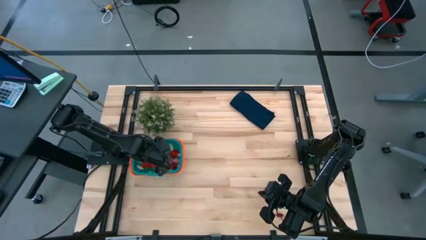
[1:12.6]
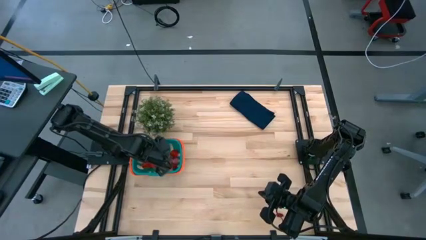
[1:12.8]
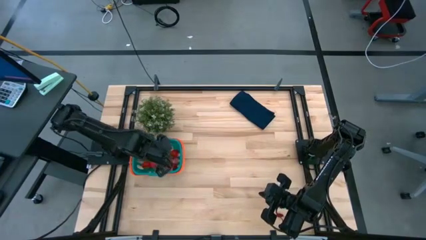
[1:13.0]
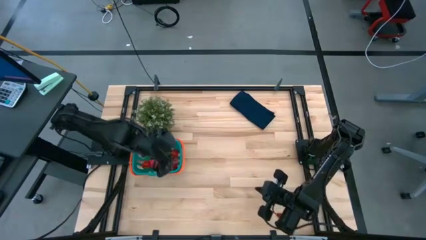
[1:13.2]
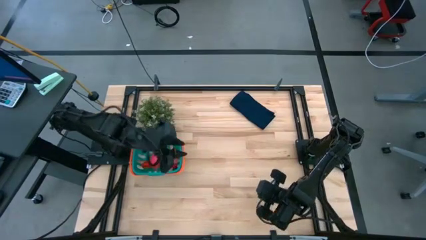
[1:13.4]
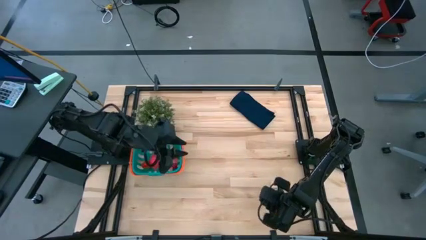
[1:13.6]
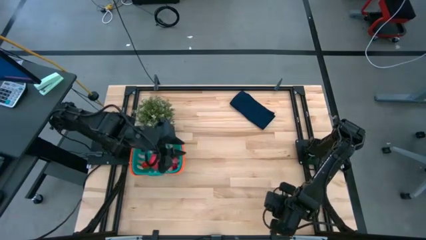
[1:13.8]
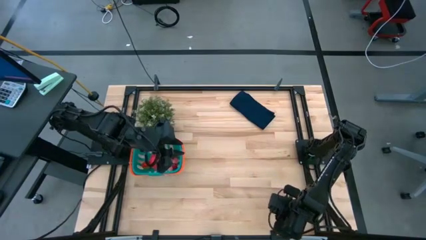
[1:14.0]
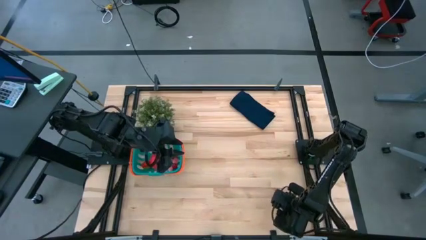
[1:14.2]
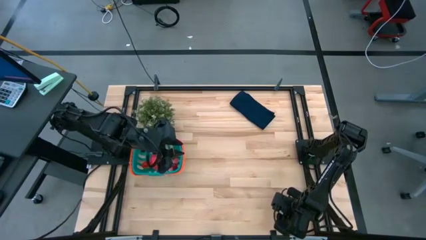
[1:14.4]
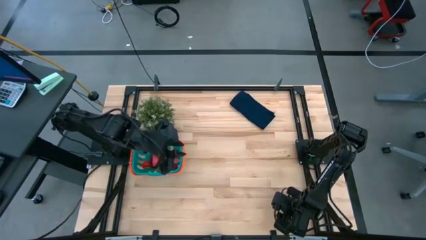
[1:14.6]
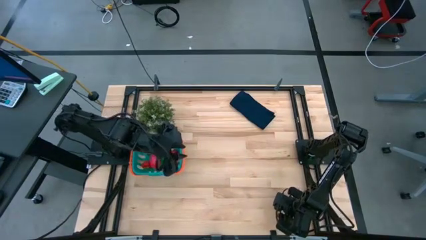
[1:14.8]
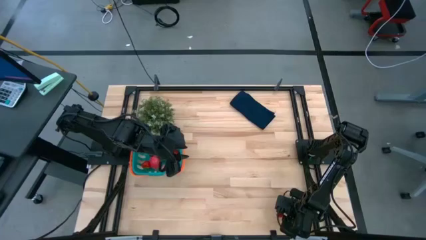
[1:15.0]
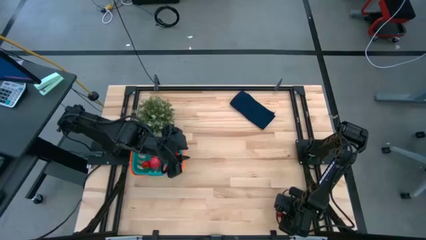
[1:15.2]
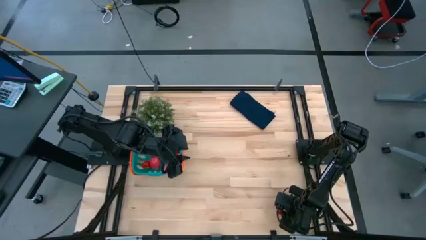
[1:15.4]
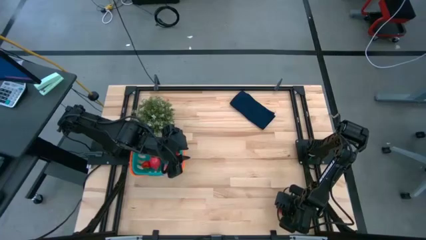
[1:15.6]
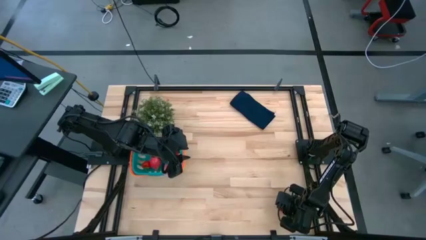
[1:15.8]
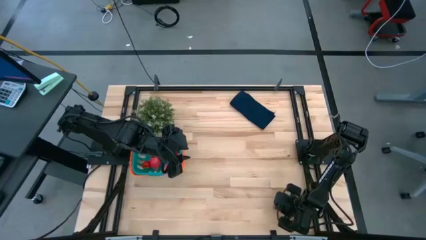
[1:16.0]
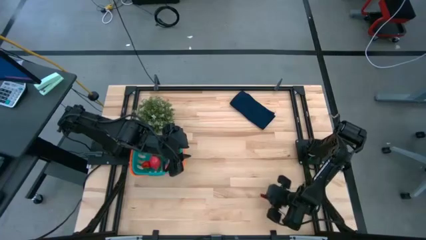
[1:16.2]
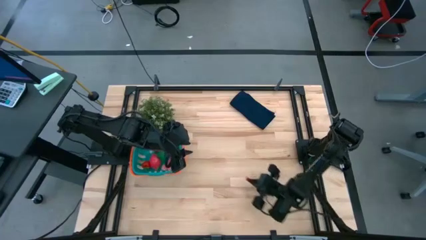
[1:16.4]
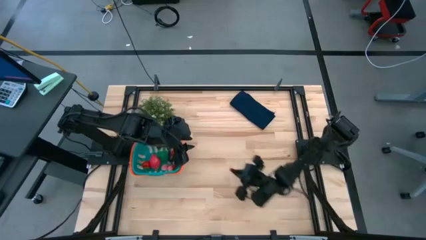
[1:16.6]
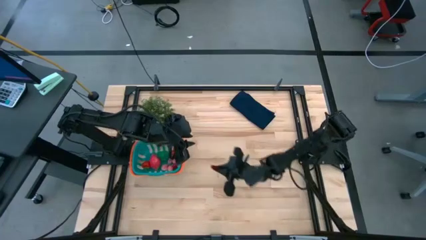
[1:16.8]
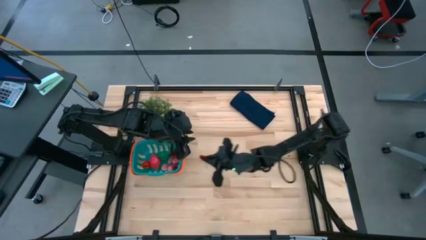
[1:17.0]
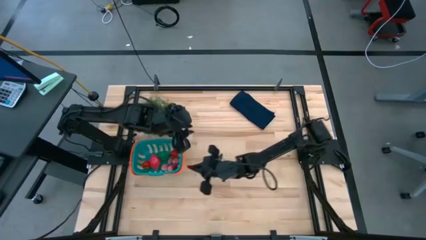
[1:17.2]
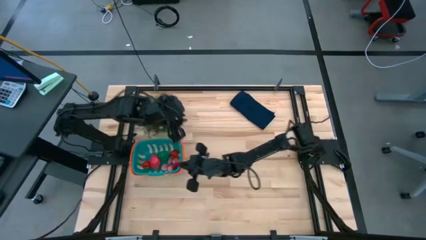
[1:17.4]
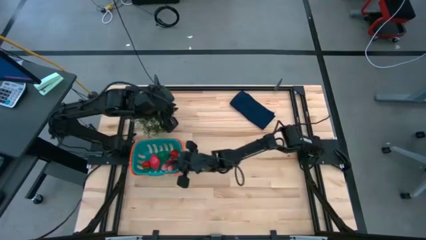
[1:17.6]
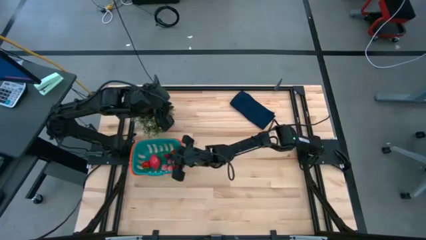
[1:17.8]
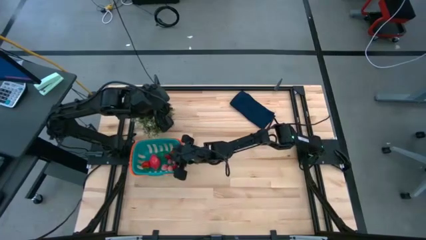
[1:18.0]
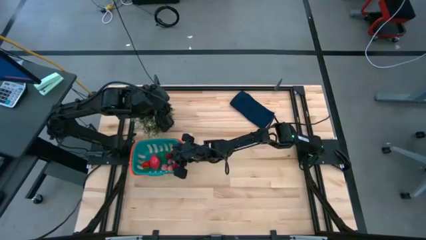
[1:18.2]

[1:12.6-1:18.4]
Task: Pick and placing Produce into tupperware
Put the red cherry into the green basket

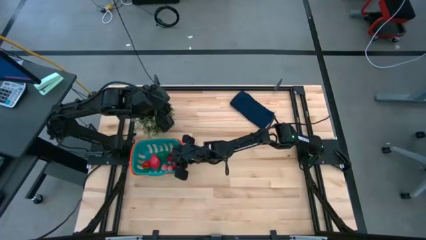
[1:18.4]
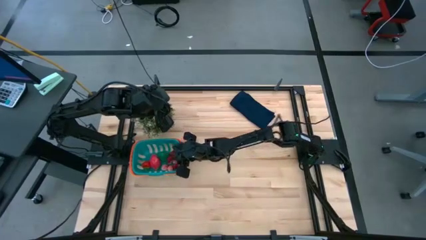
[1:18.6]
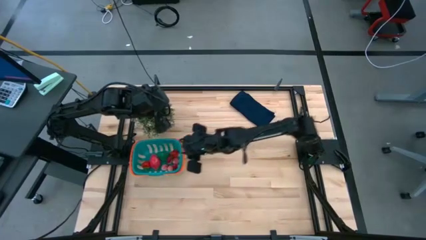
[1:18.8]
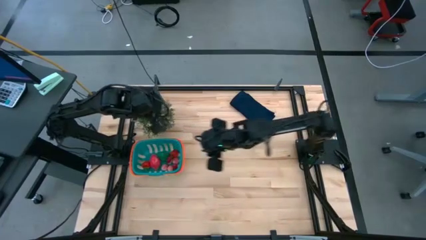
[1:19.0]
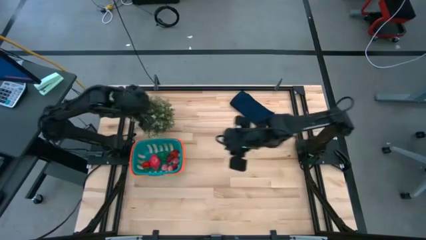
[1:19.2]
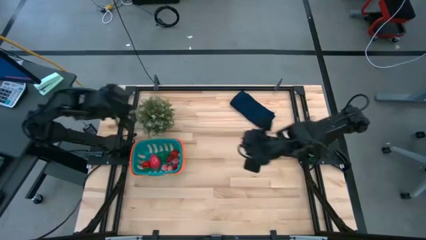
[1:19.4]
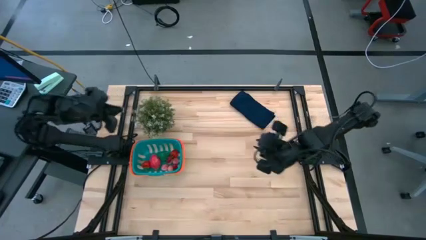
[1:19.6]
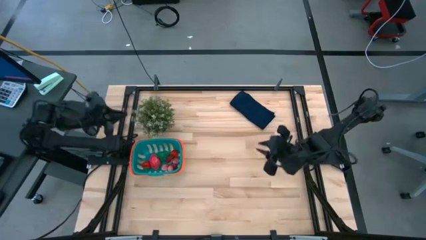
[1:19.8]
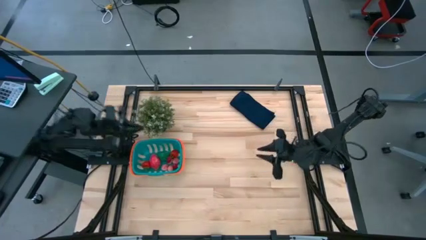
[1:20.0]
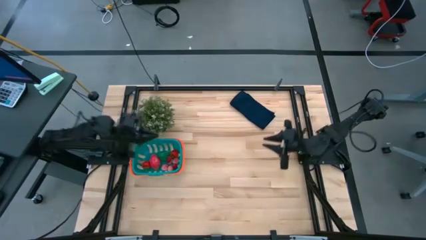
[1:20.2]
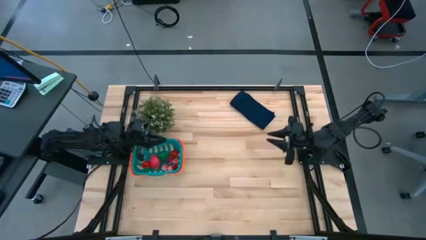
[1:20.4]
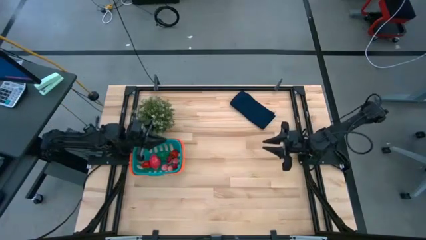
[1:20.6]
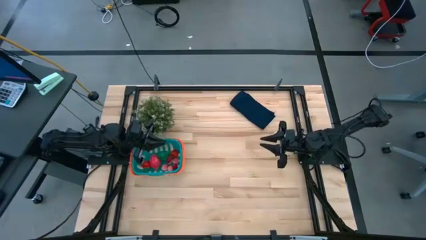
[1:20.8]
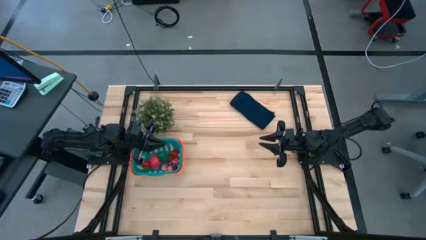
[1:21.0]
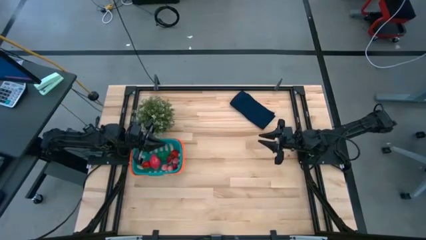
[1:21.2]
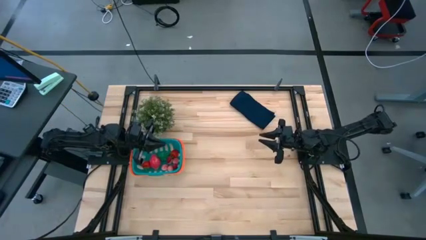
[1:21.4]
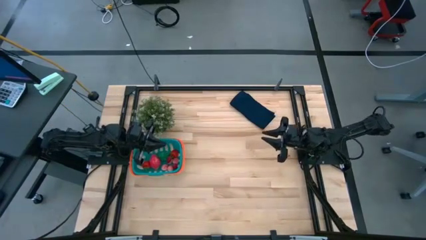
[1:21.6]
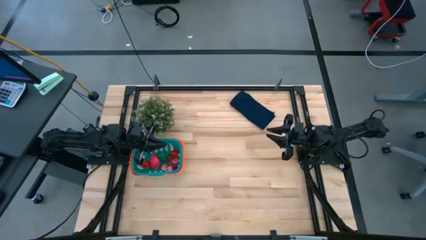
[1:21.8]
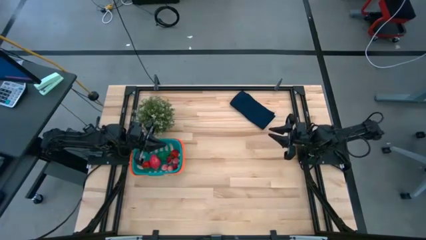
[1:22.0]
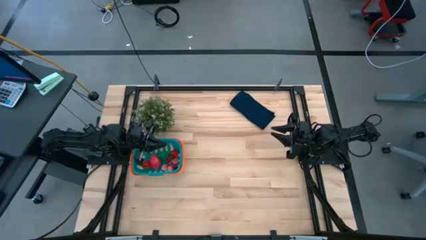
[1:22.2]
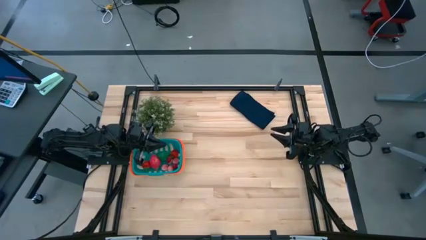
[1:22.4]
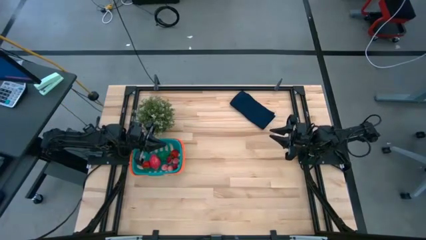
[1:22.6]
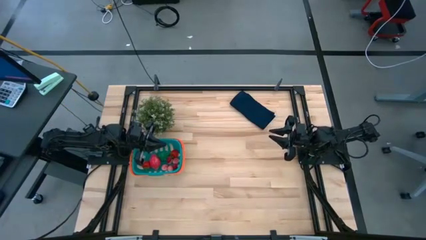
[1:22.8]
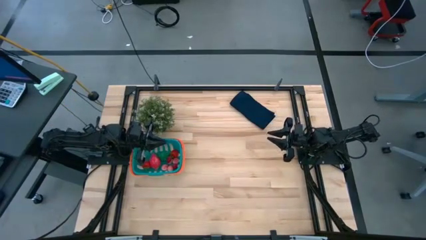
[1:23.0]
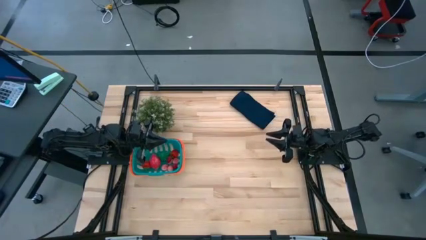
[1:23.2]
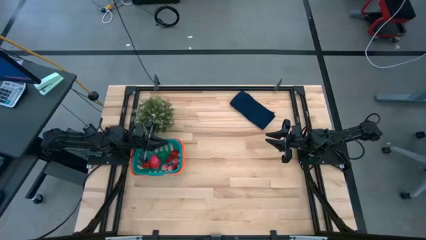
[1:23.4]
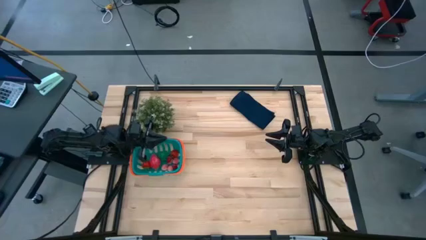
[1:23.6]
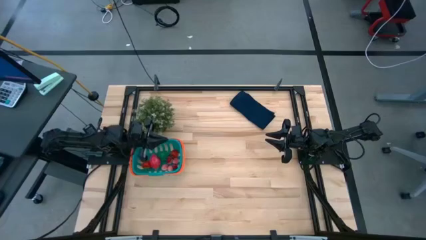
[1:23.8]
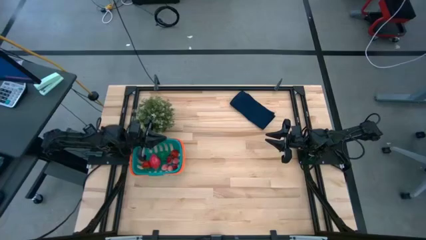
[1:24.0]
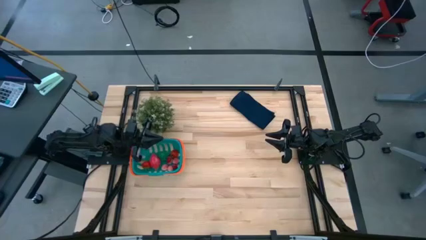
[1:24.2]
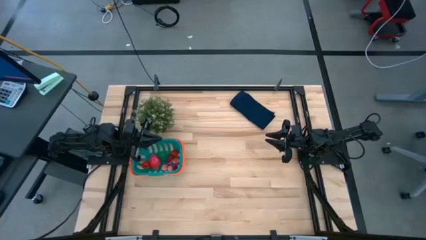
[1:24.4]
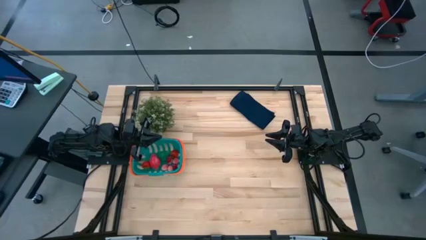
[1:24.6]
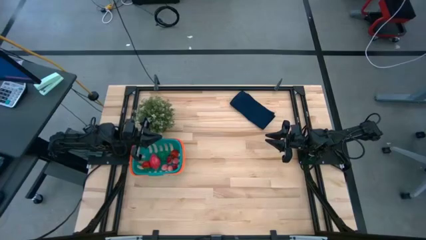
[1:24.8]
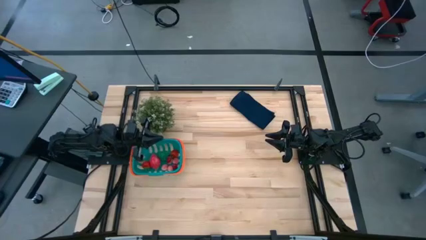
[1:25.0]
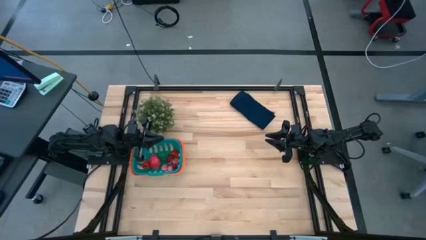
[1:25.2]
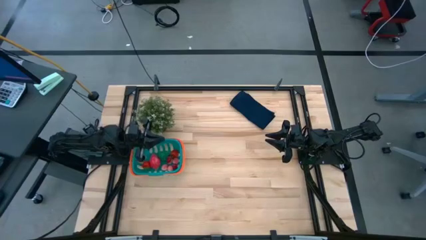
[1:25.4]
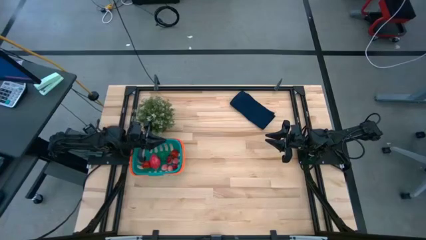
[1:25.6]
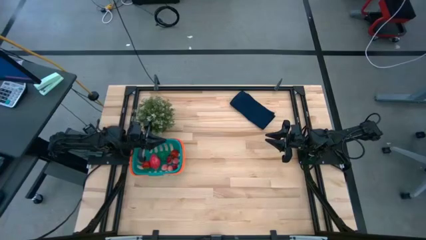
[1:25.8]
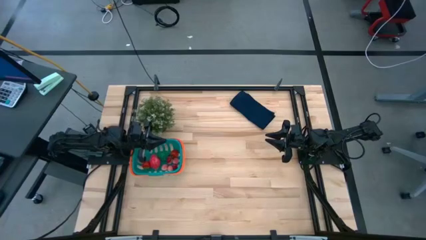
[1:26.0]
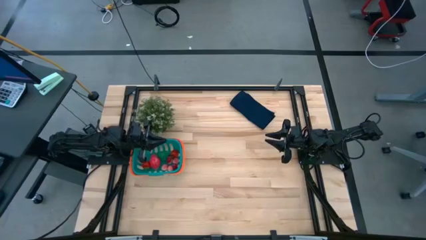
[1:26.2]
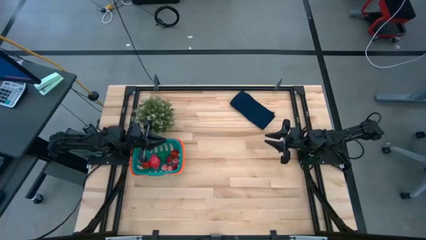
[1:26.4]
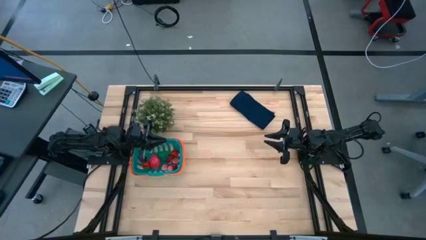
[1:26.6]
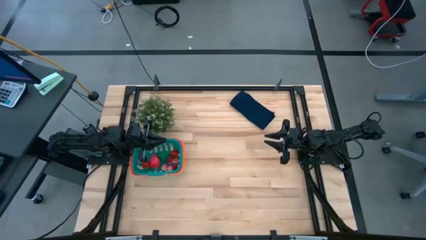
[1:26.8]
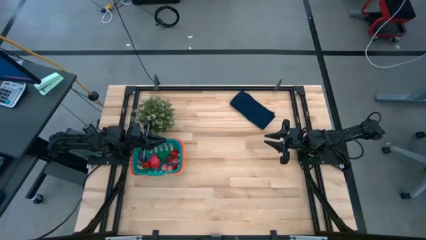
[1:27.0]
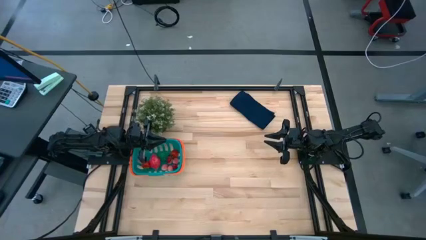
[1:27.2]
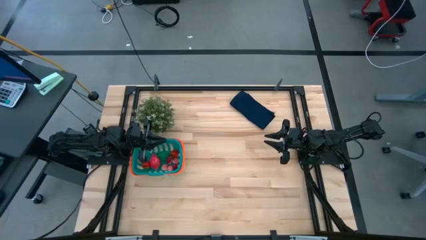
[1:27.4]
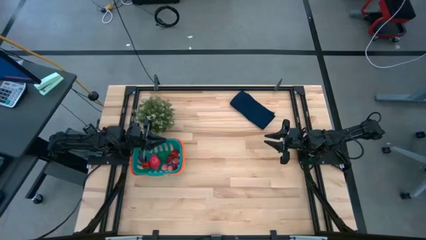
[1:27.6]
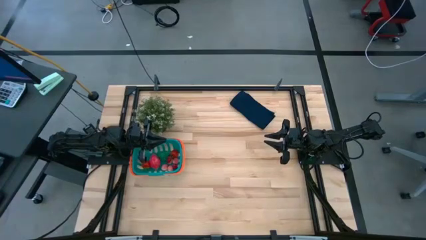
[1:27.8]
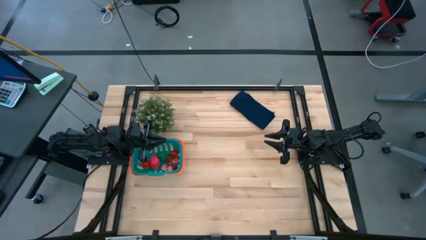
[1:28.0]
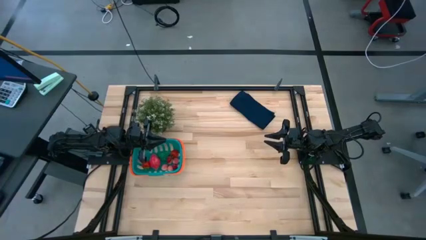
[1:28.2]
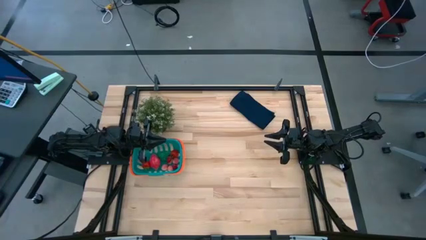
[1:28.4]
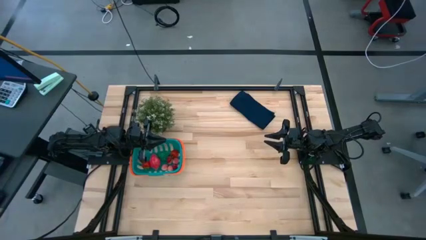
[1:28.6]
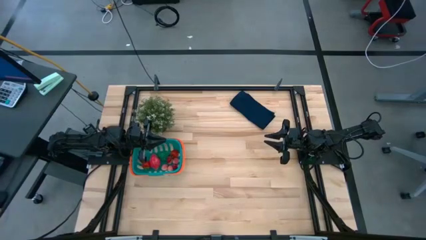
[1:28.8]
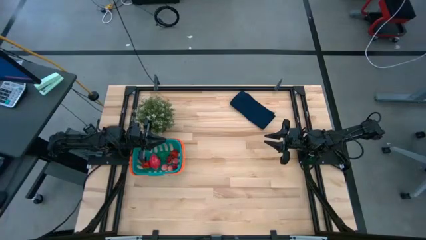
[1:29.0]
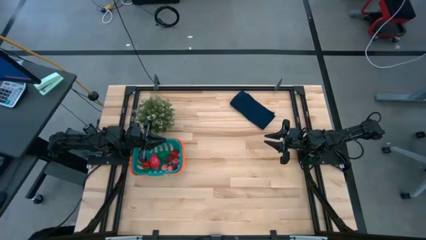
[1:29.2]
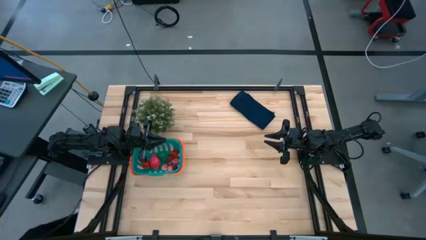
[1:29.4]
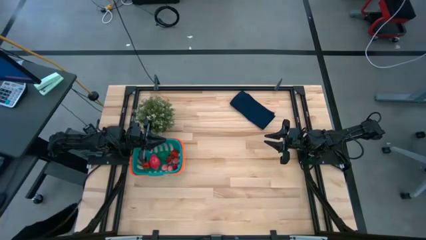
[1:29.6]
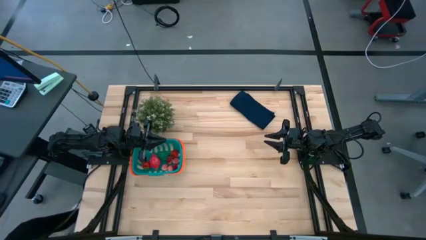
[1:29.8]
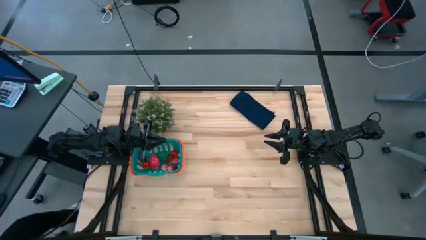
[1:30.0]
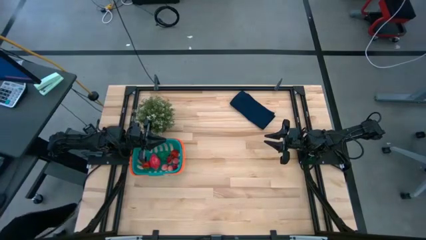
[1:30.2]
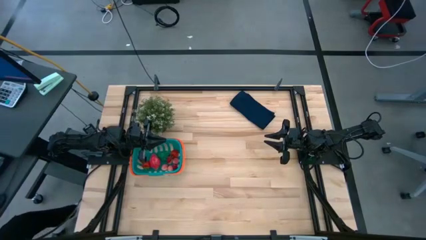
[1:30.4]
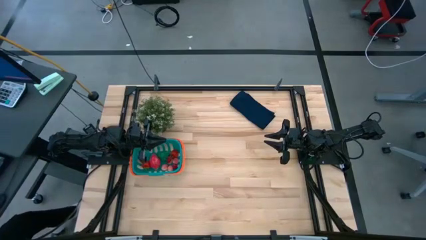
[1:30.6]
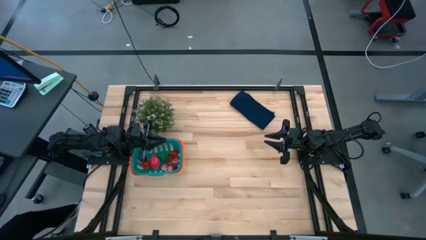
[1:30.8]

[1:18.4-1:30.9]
Return to Home Position

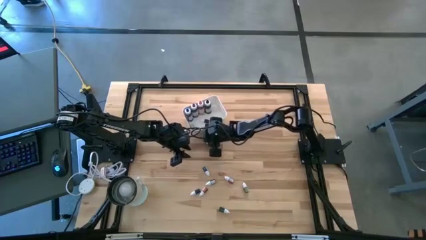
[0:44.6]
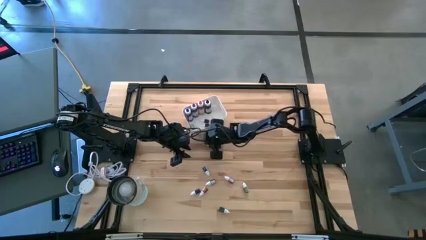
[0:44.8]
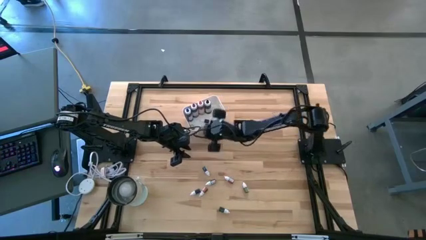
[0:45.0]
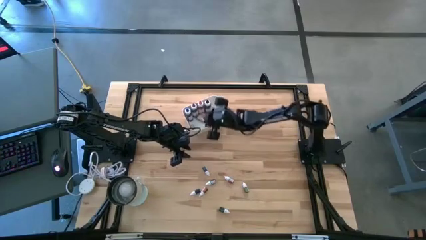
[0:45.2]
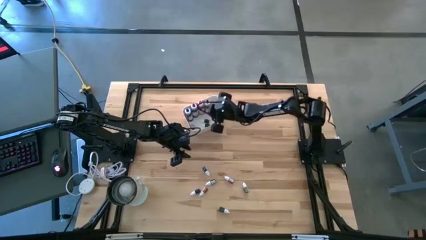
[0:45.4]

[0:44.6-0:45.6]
Task: Pick & Place food coloring
Put the top small red food coloring bottle into the white bin
